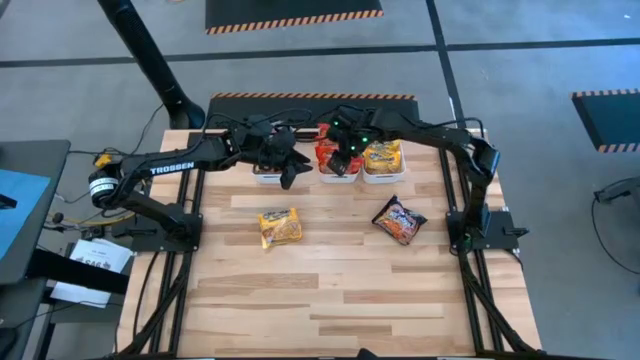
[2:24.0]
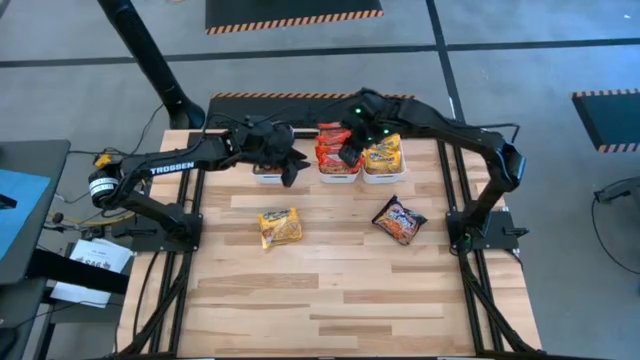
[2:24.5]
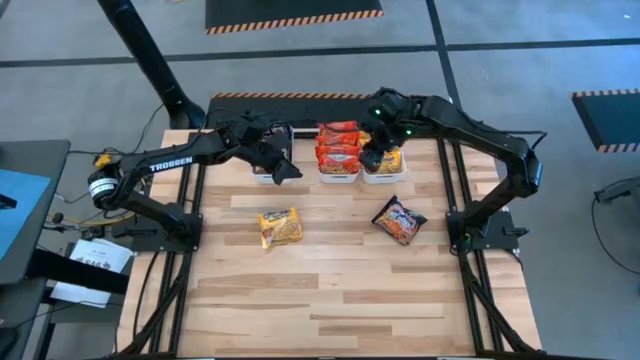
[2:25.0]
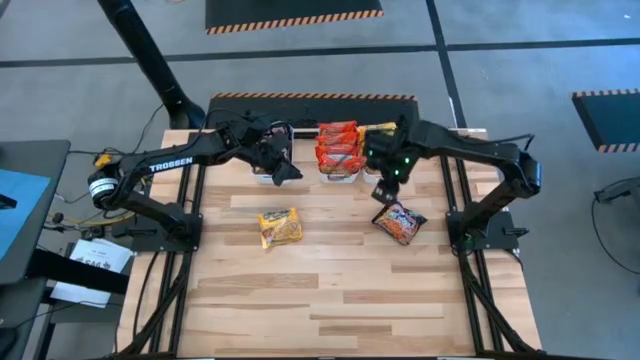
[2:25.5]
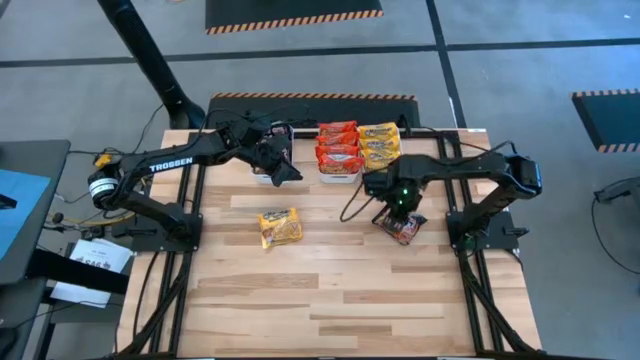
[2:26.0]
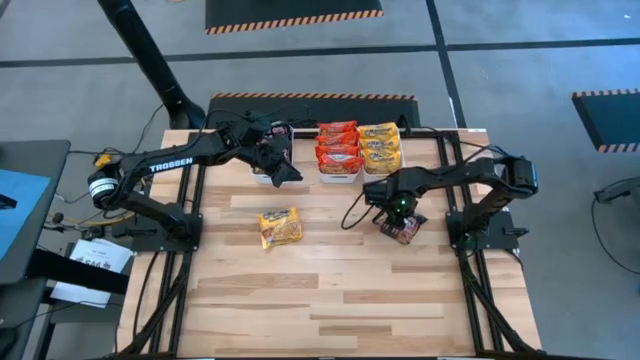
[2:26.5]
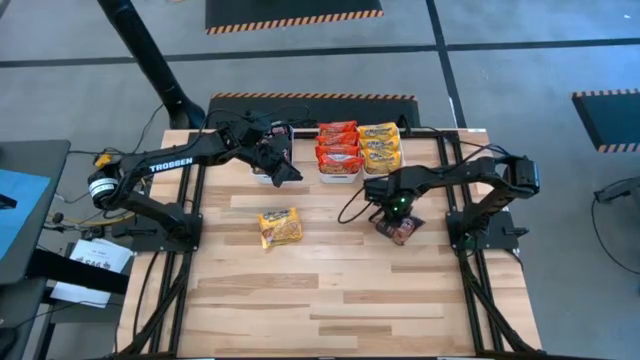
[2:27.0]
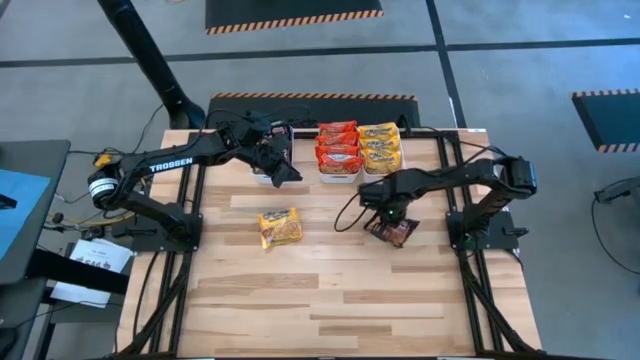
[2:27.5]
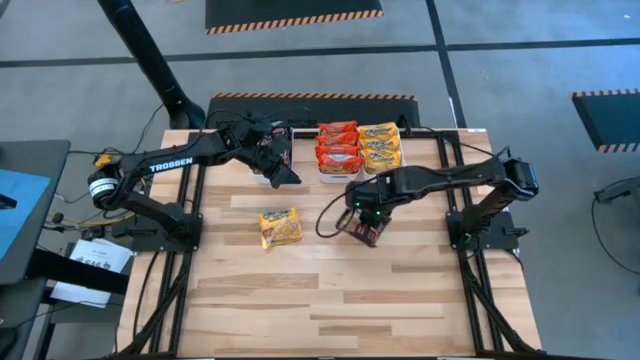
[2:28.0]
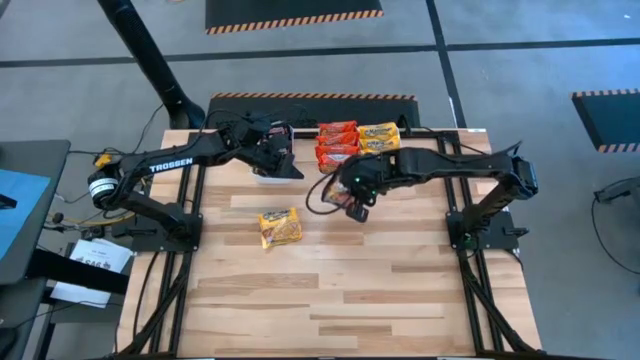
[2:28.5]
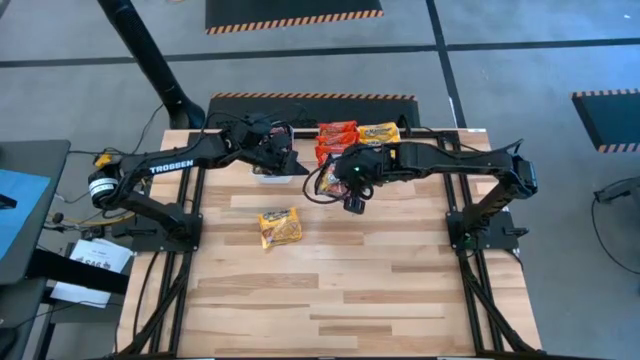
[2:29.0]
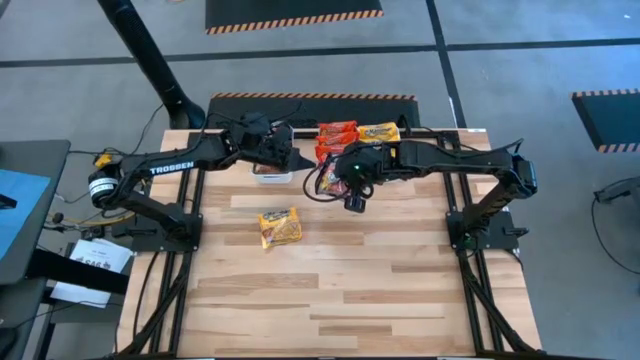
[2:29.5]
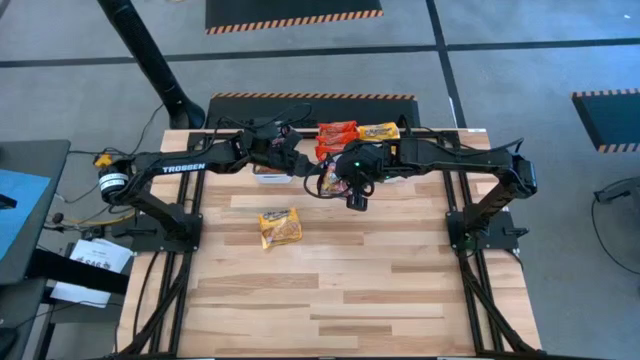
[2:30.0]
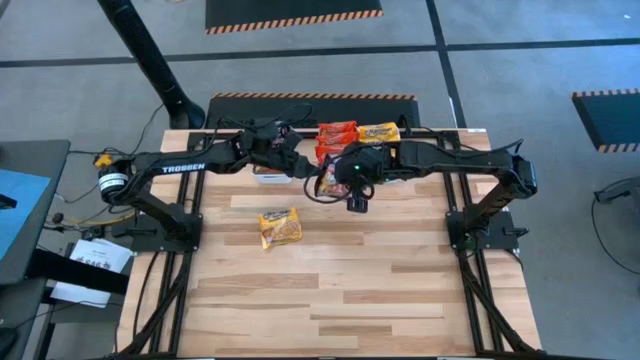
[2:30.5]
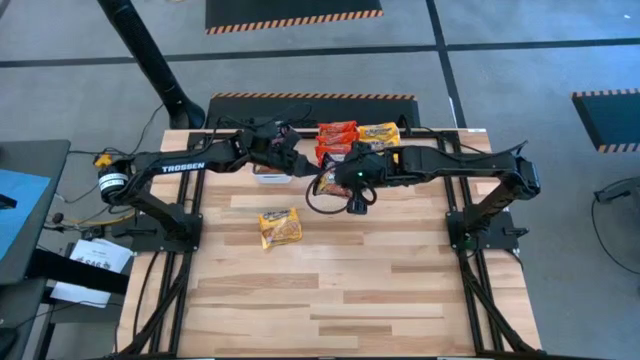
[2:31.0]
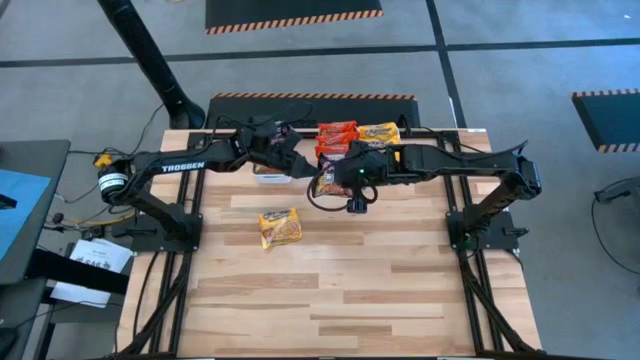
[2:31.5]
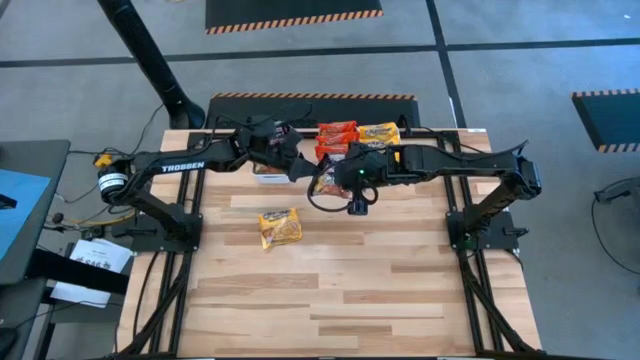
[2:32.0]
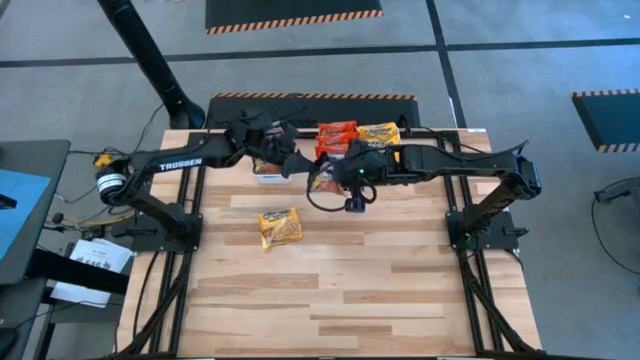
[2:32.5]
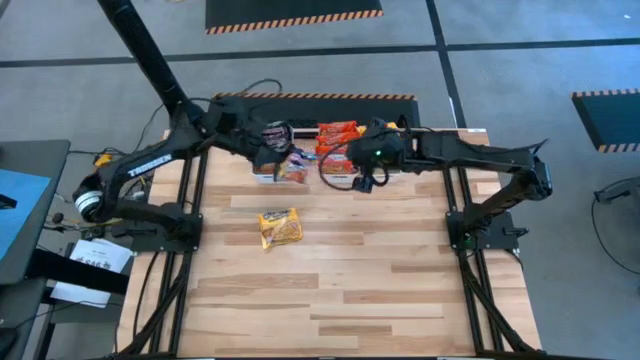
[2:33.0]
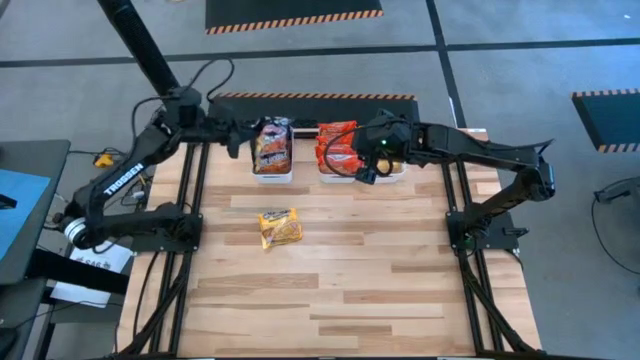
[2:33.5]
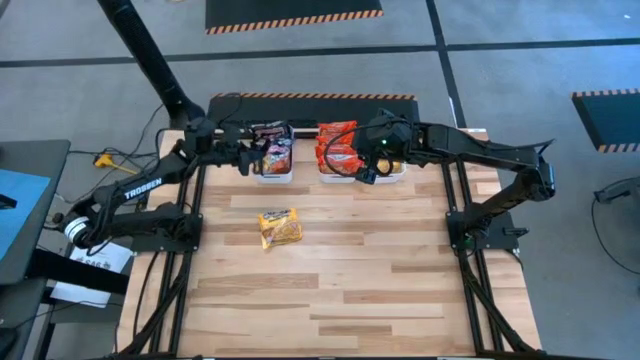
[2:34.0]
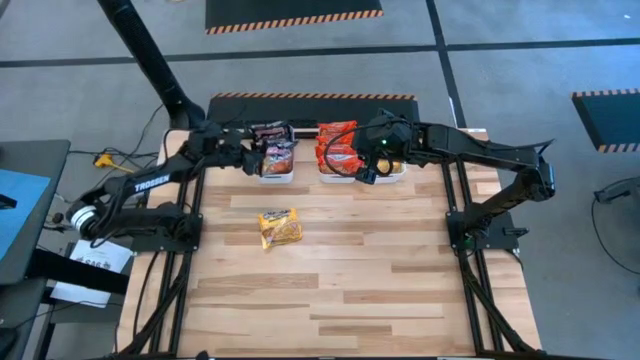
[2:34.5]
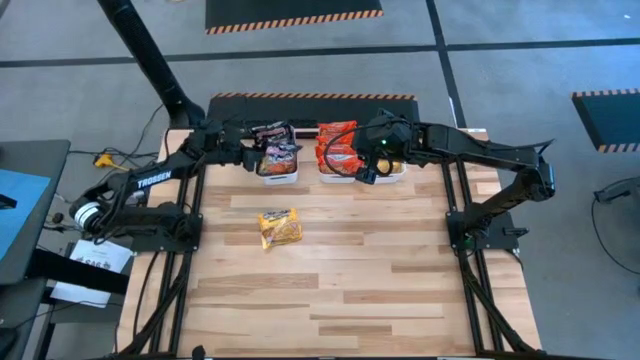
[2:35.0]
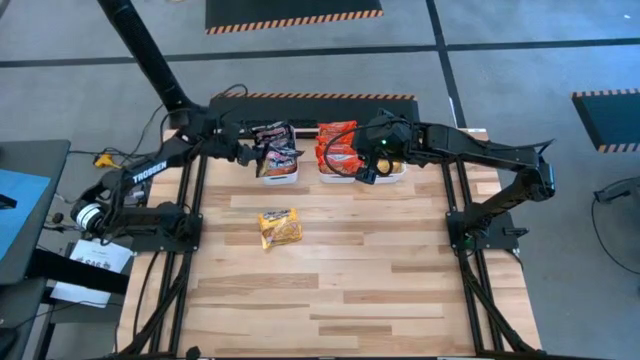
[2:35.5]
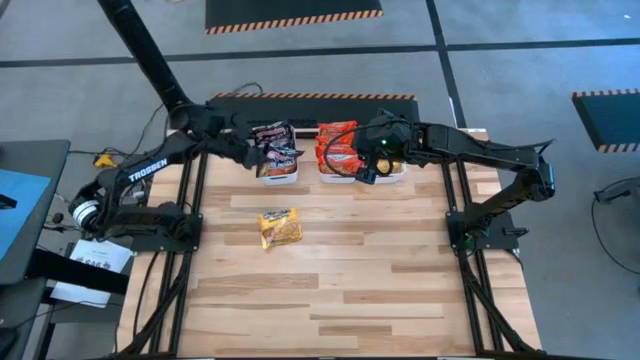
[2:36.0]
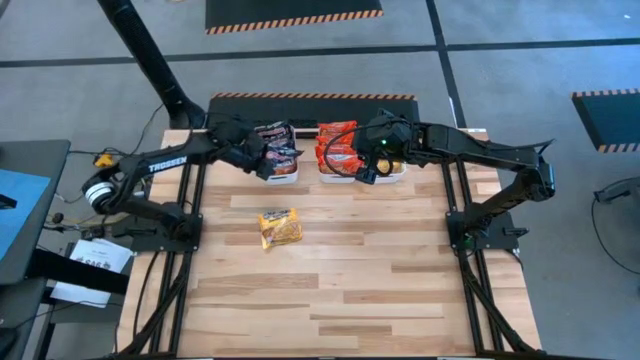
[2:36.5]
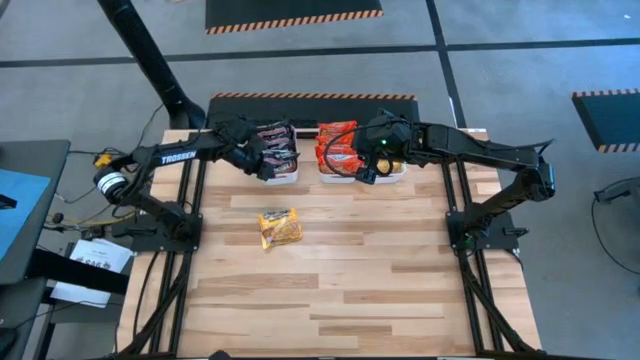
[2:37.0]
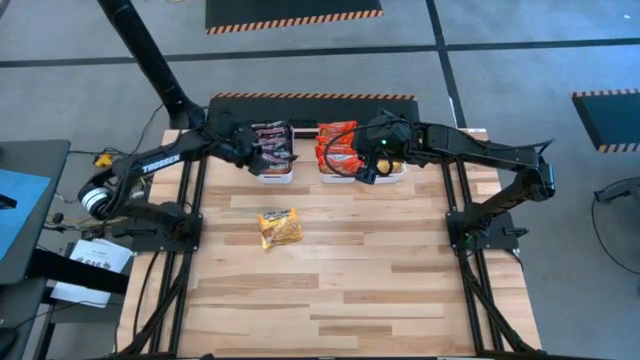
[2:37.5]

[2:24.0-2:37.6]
Task: Sort Maruchan noodles
Put the black noodle pack into the left white bin

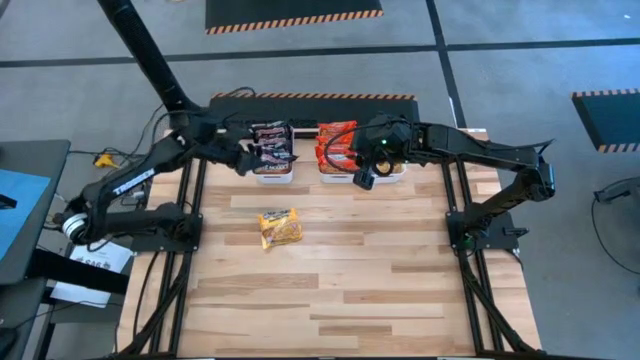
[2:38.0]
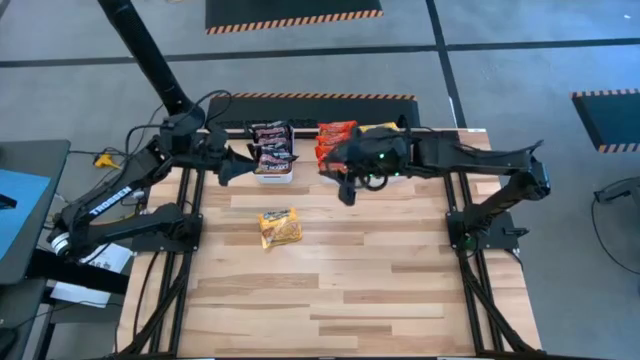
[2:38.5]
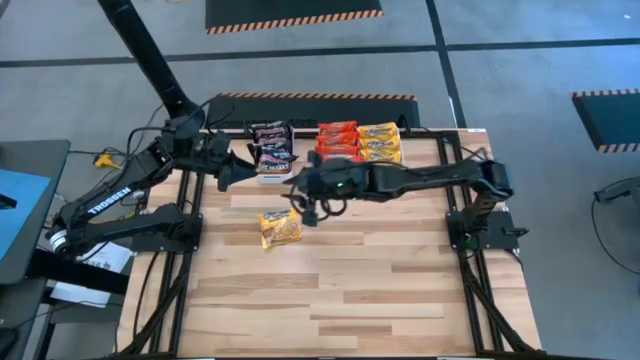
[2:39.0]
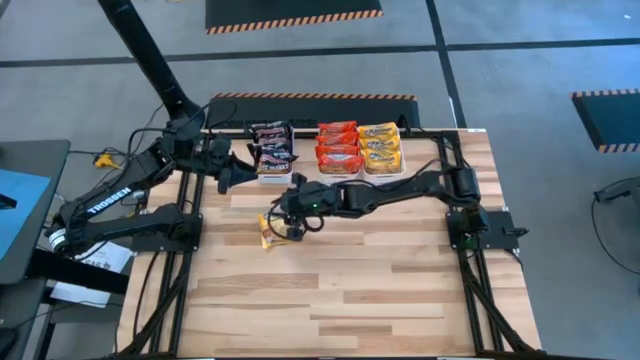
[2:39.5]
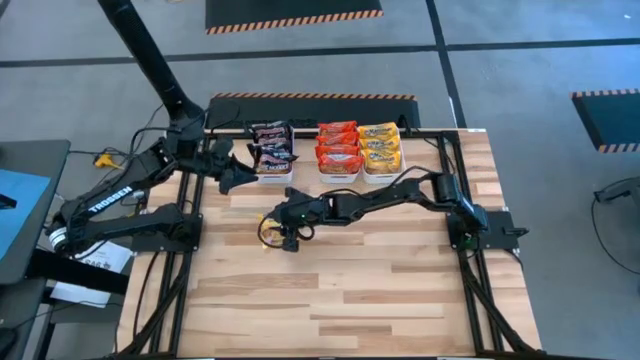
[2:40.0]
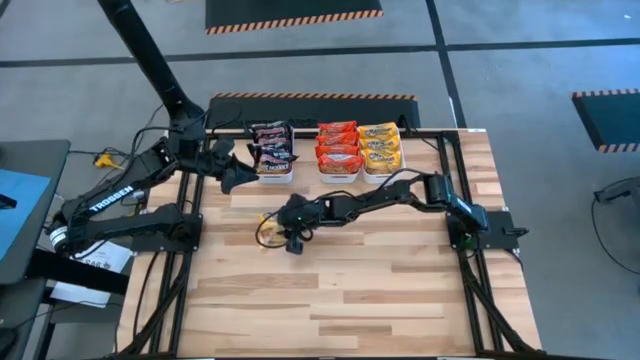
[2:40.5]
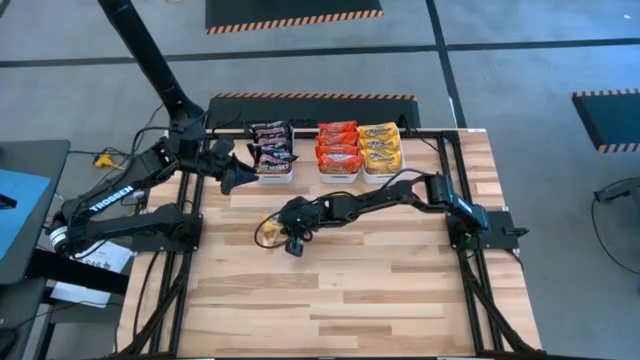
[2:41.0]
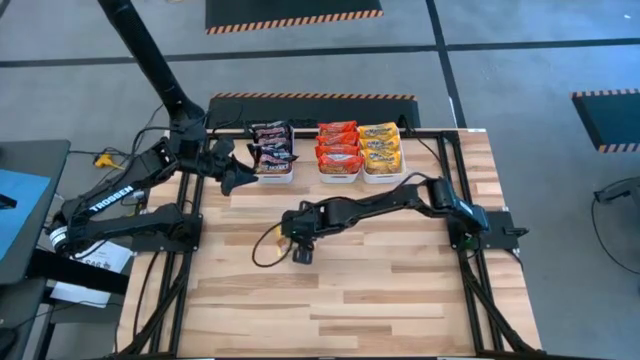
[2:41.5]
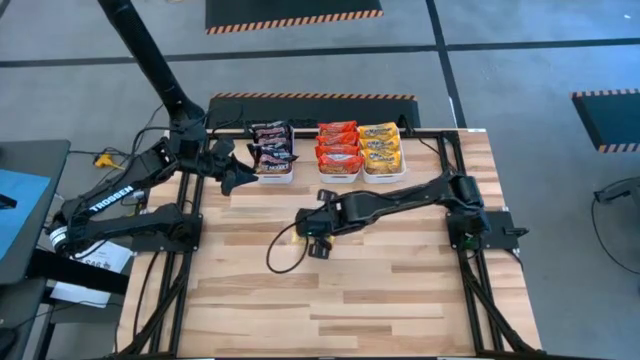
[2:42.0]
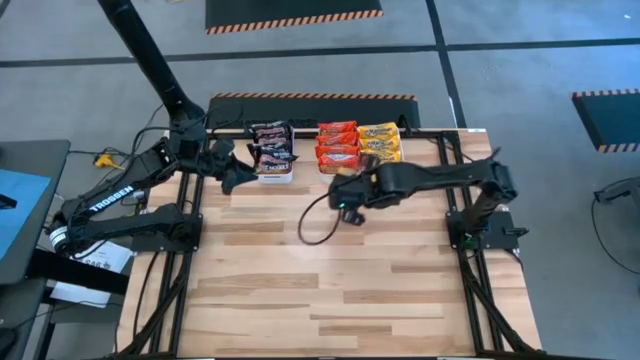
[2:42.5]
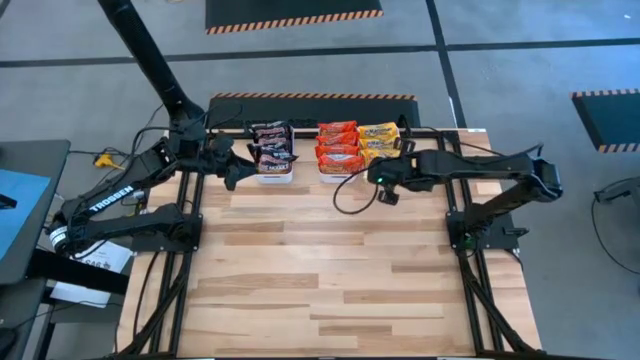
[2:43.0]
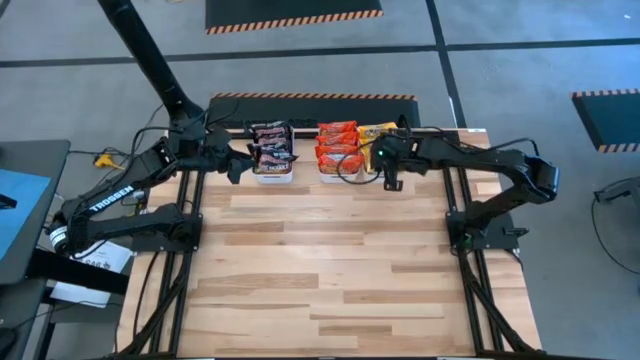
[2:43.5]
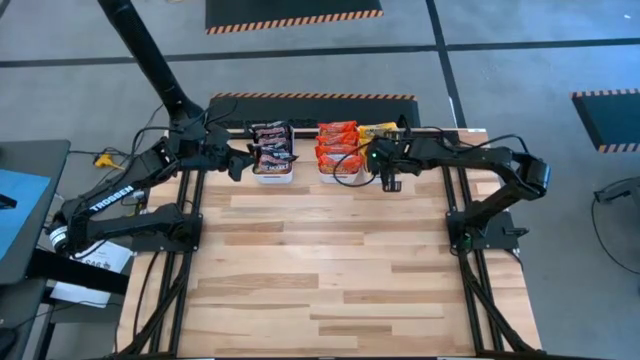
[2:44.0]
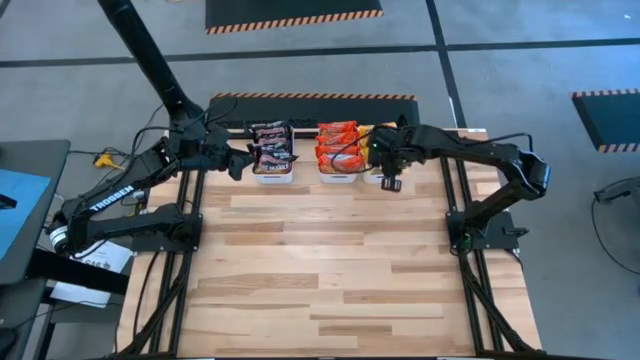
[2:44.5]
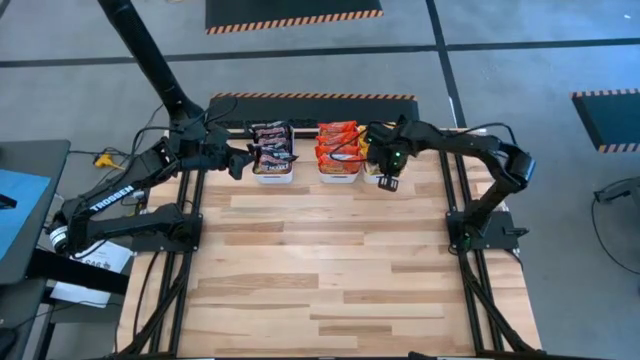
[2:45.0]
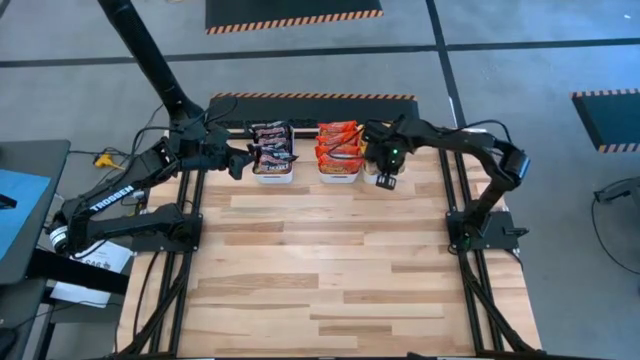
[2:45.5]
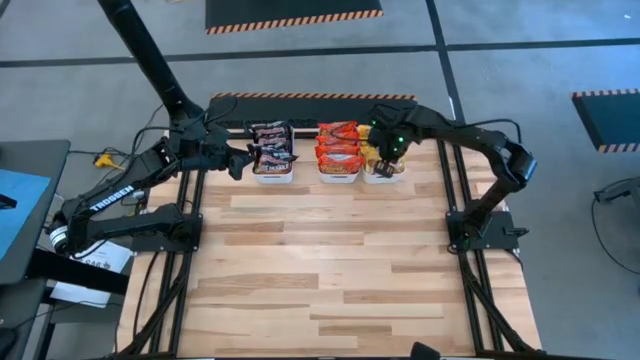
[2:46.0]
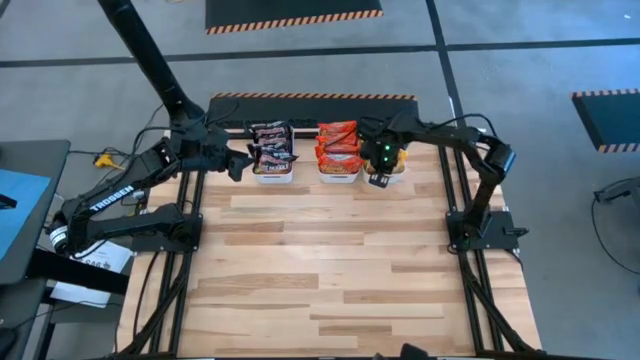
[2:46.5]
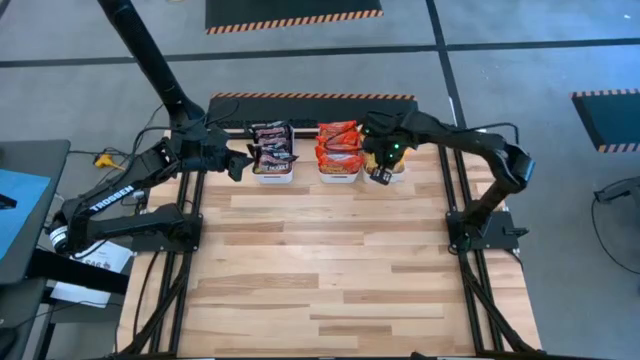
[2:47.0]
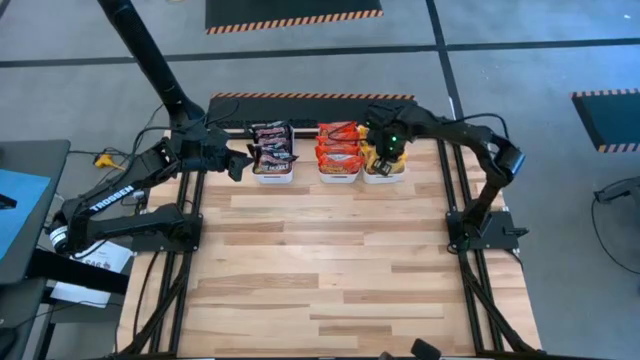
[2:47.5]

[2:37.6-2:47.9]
Put the yellow noodle pack into the right white bin
